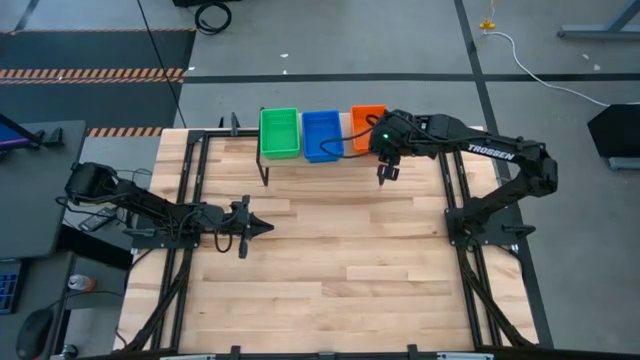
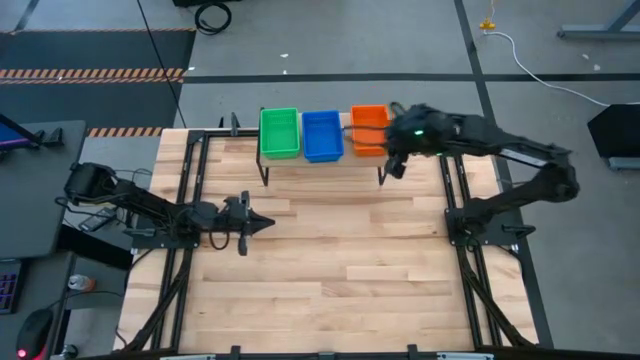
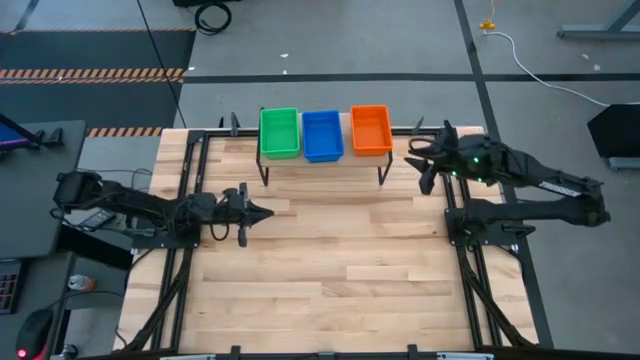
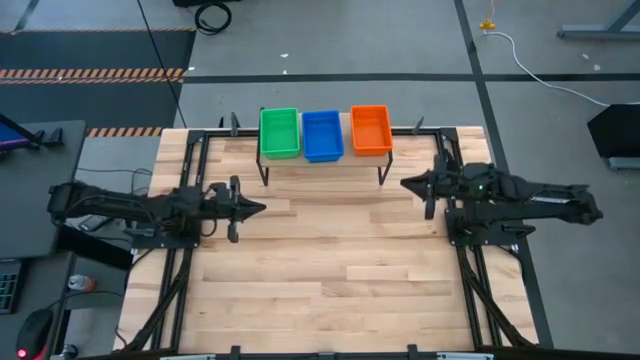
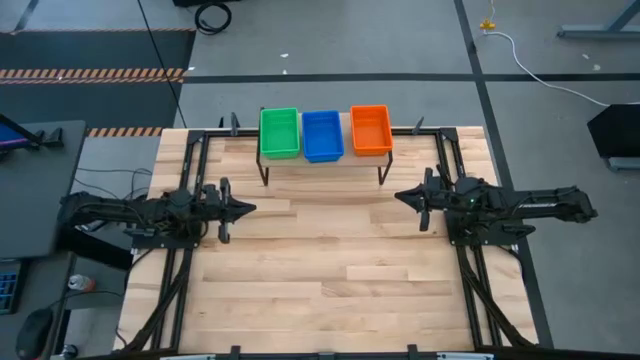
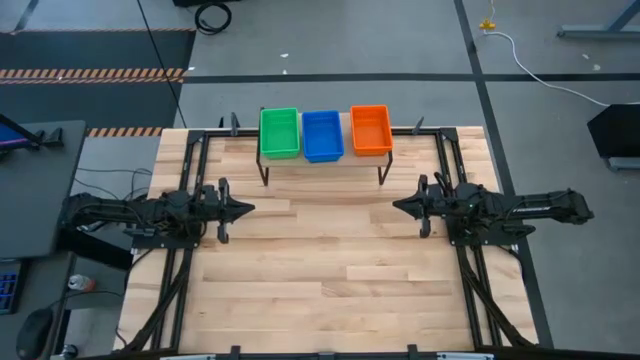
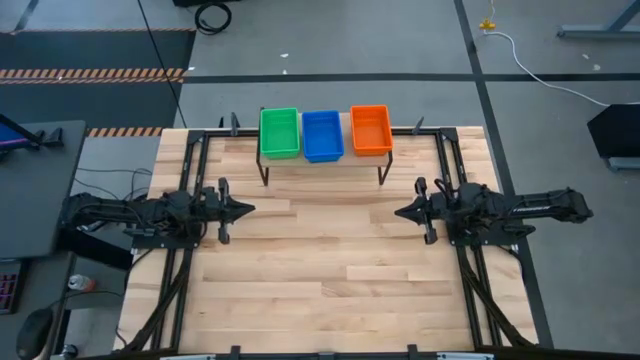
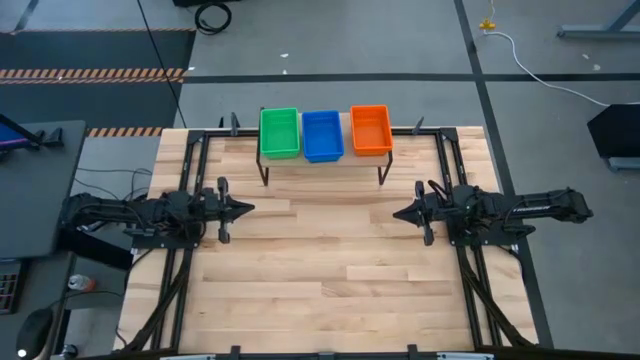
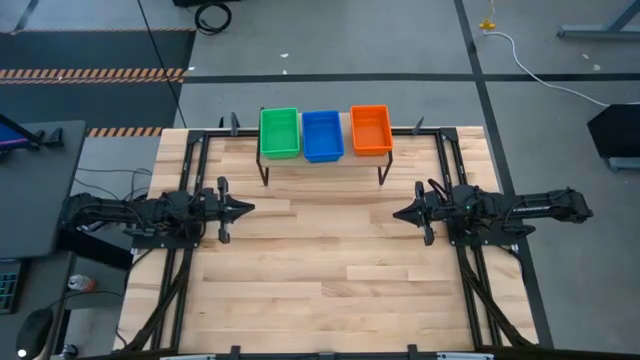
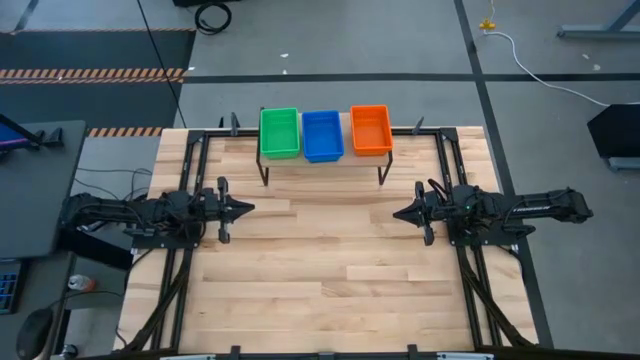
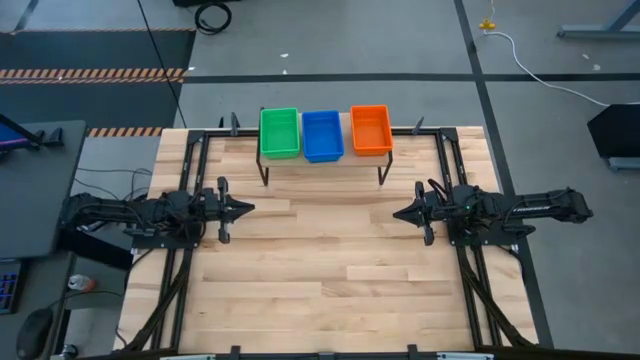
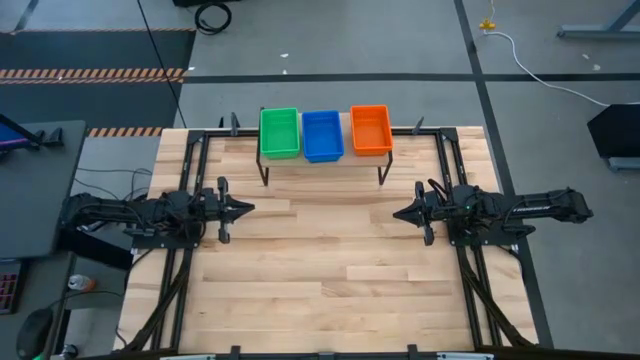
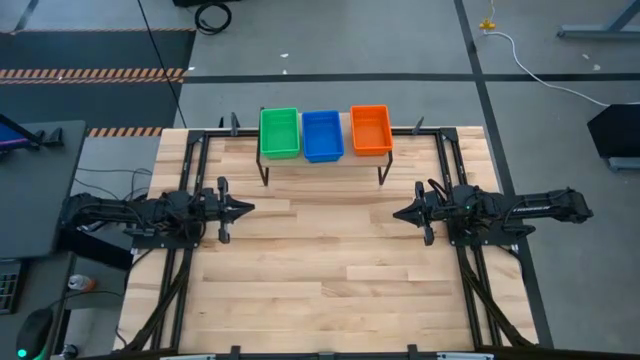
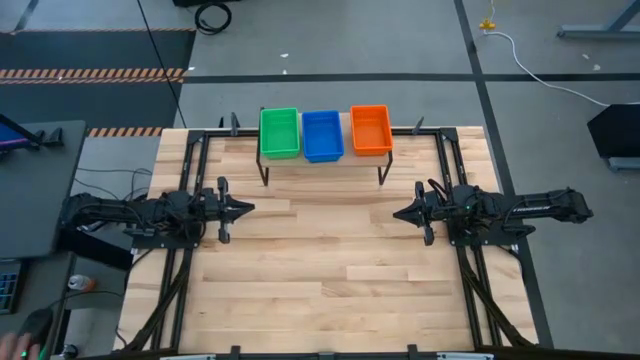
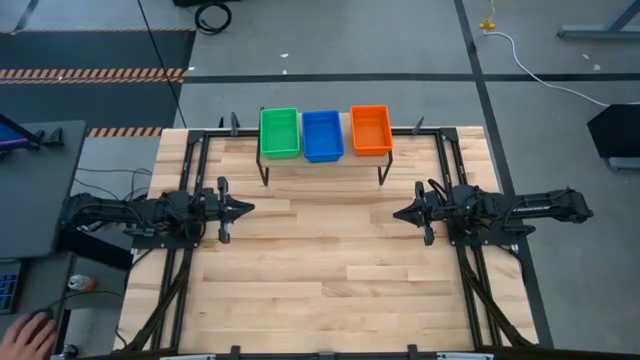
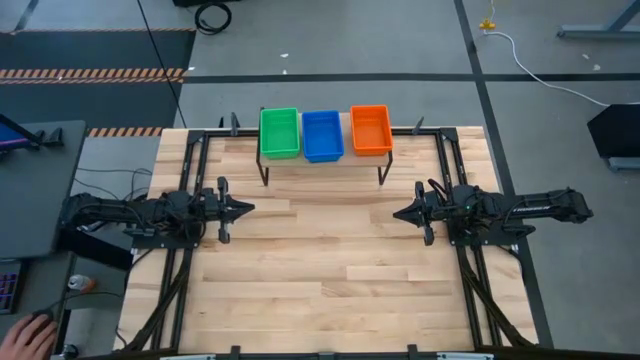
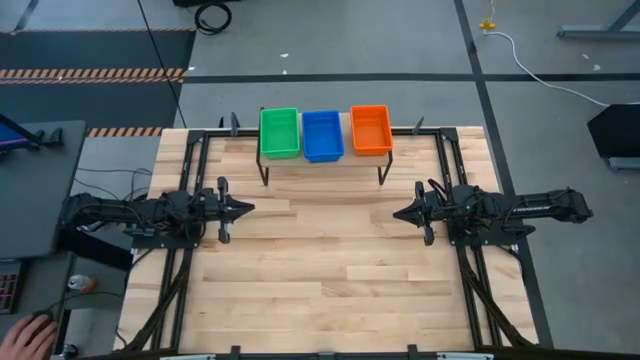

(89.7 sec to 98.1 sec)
Task: Stack baskets on shelf by color
Return to Home Position

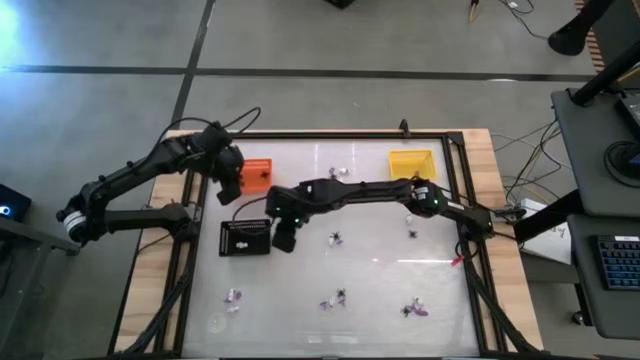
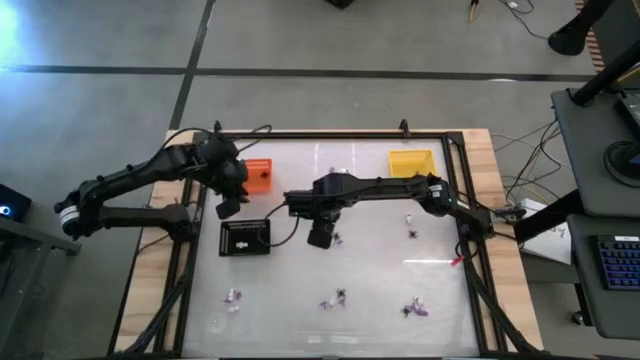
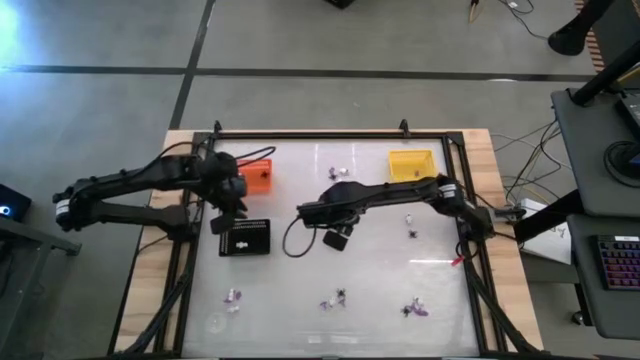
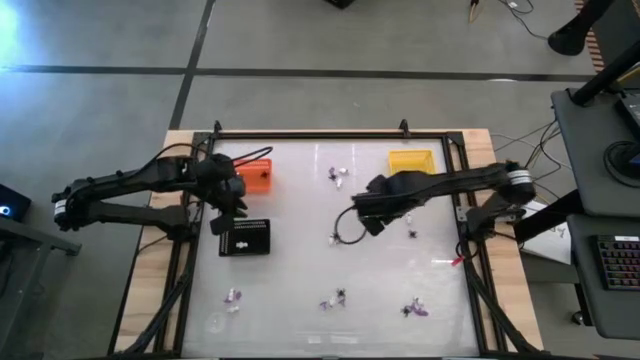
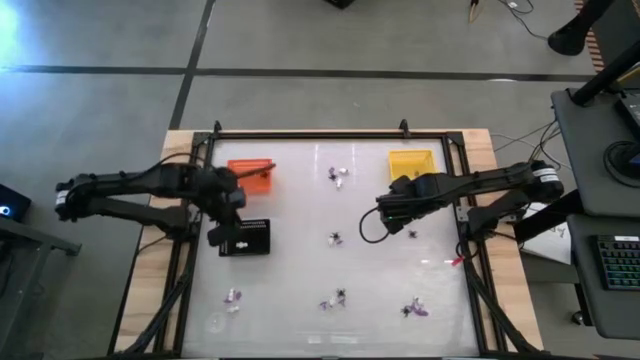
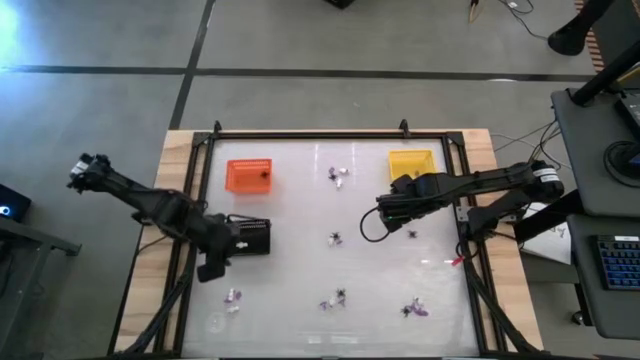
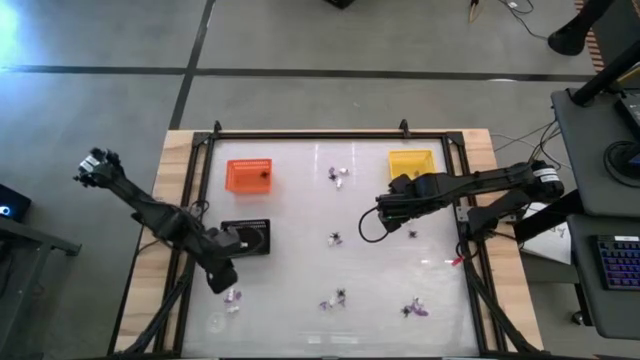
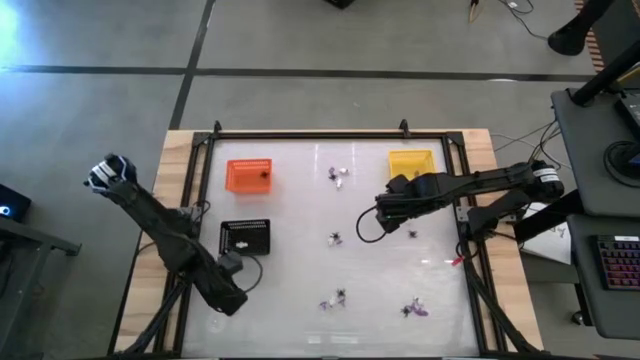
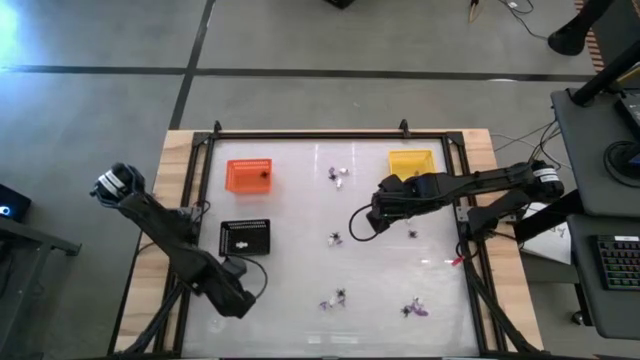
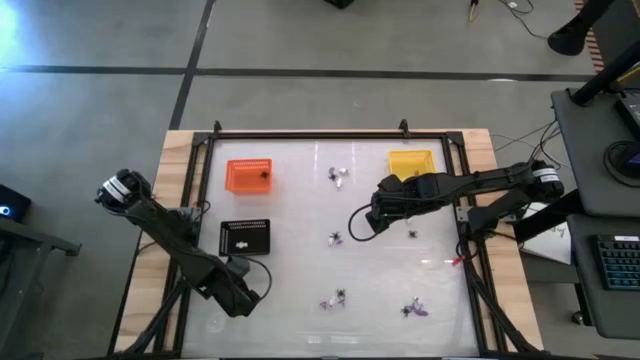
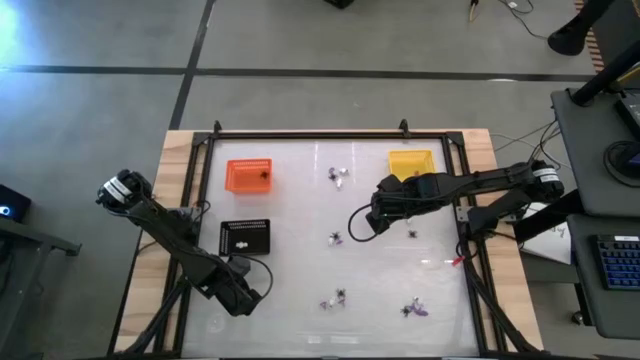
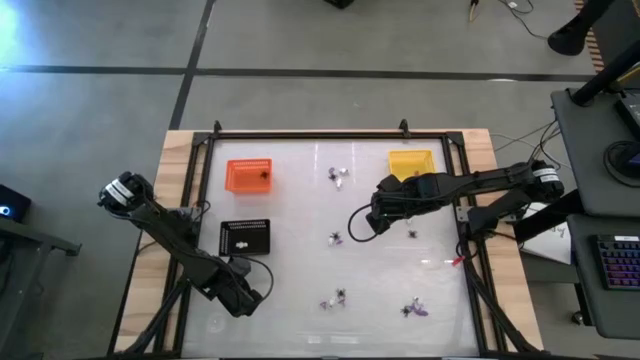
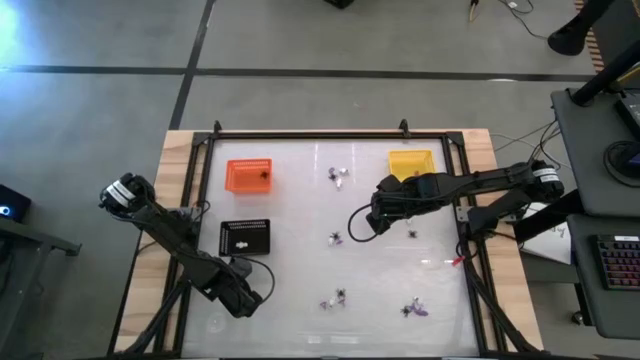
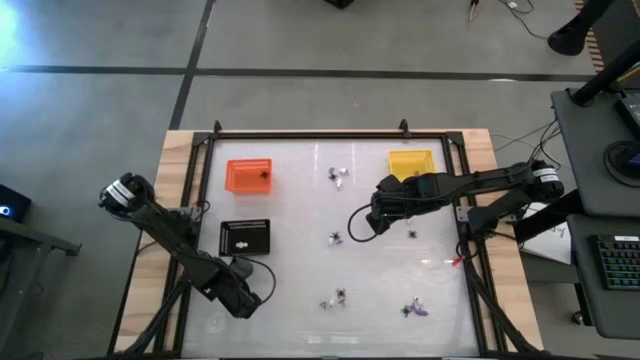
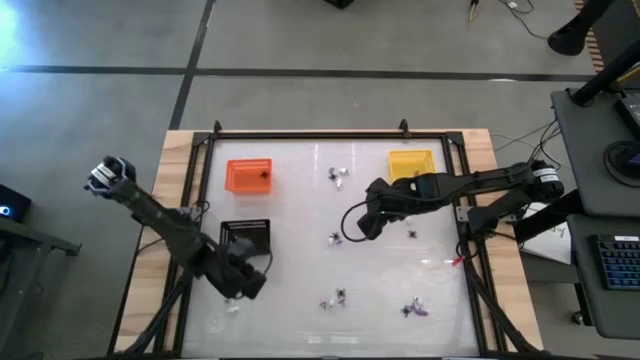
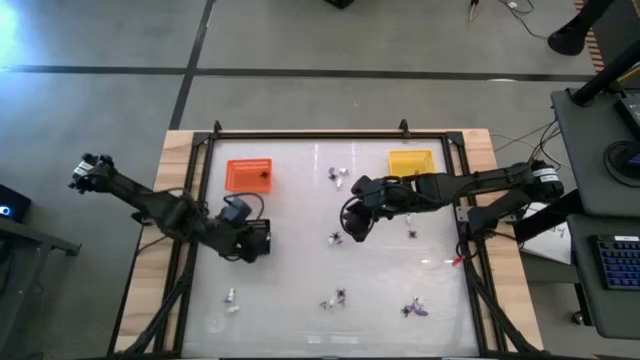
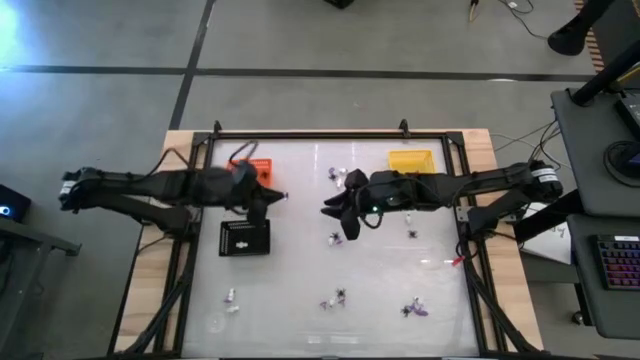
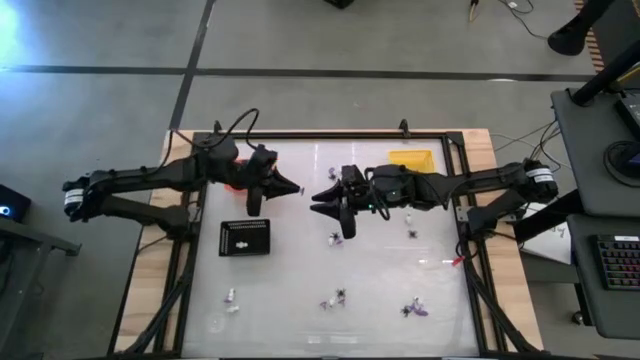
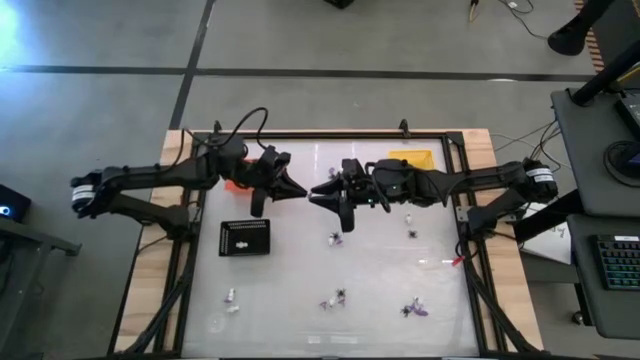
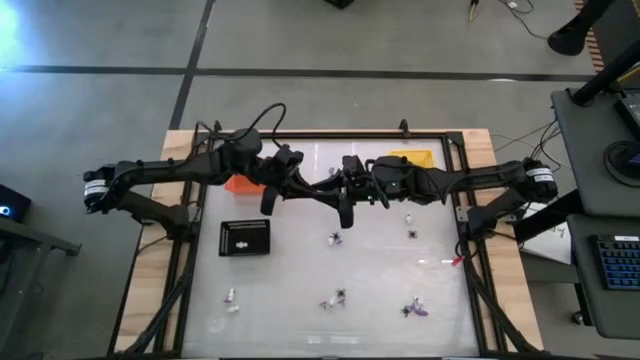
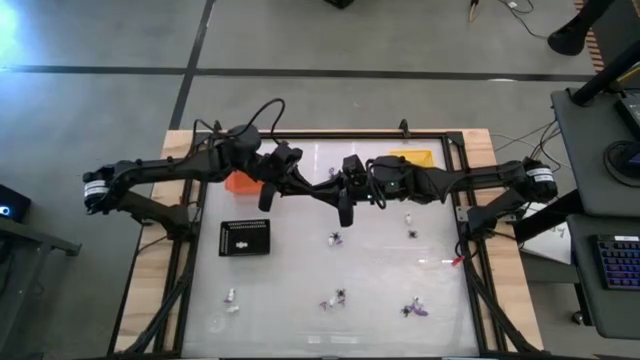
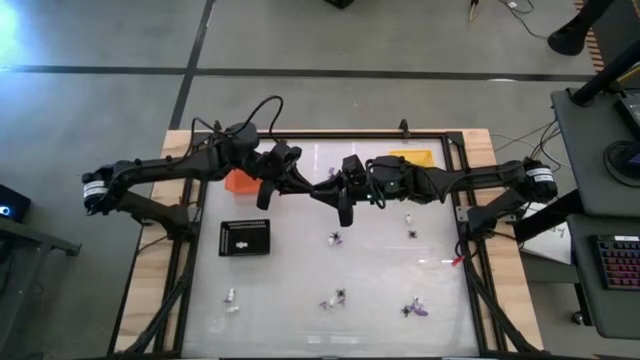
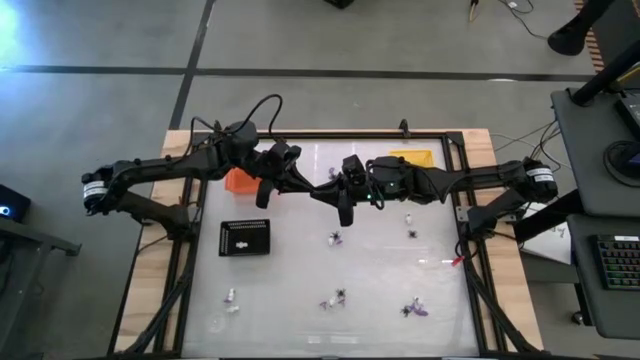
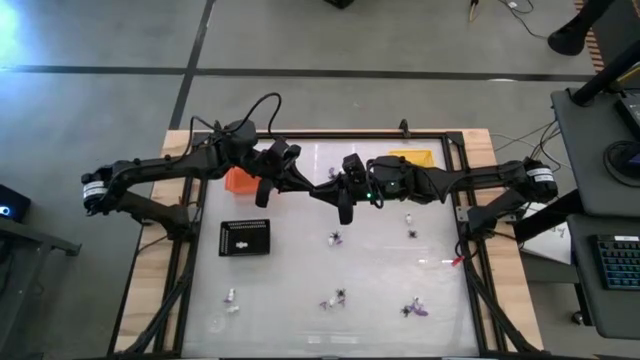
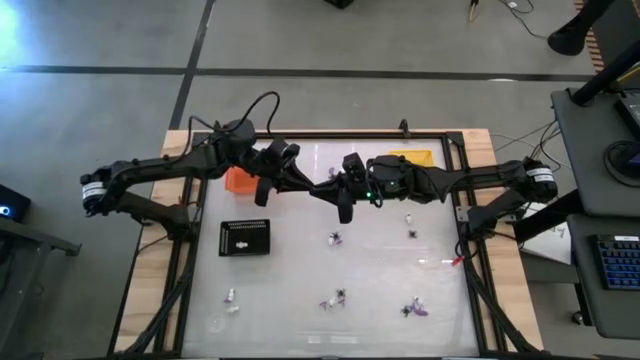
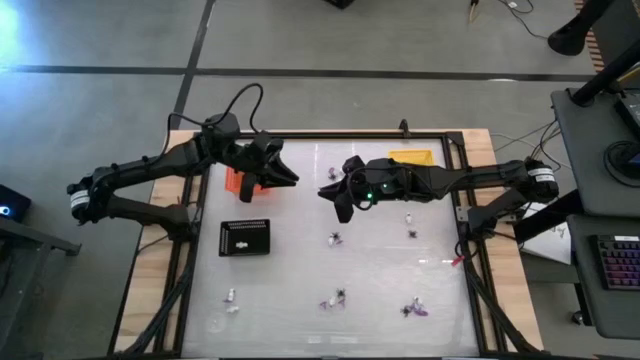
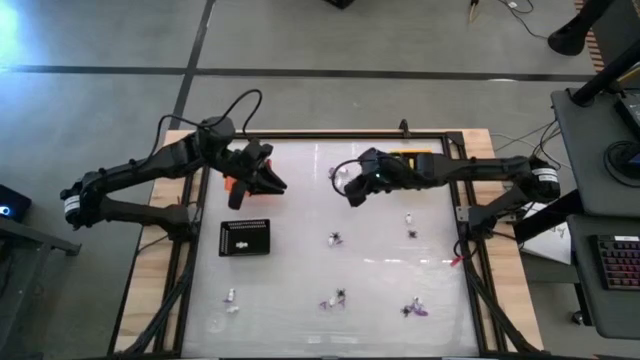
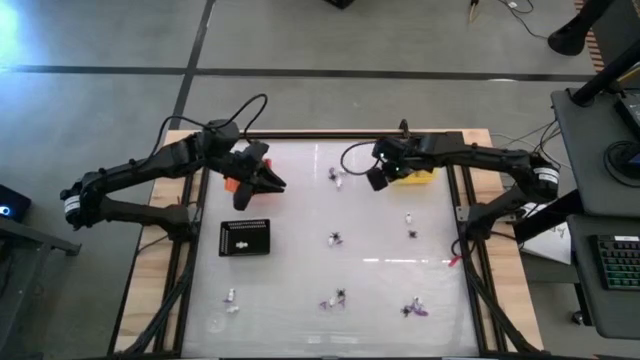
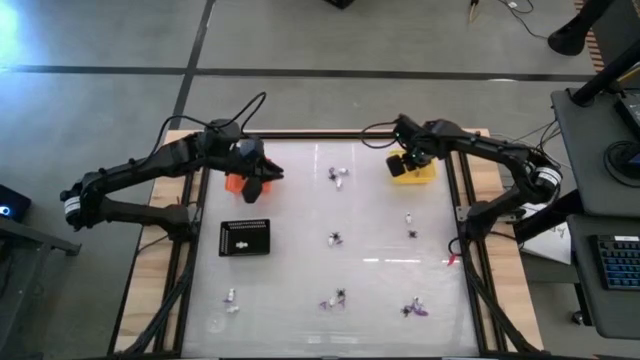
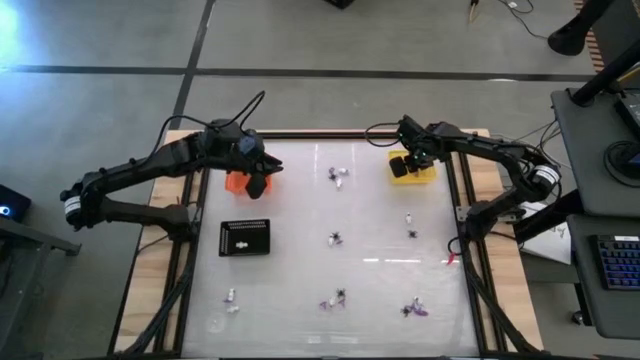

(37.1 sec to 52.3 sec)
Task: Sort Halloween decoration
Put the purple witch hat toy into the yellow bin
